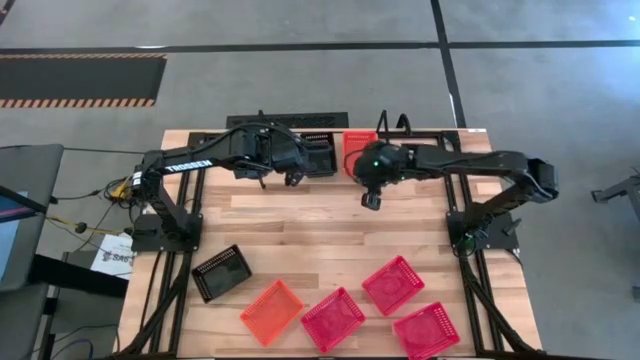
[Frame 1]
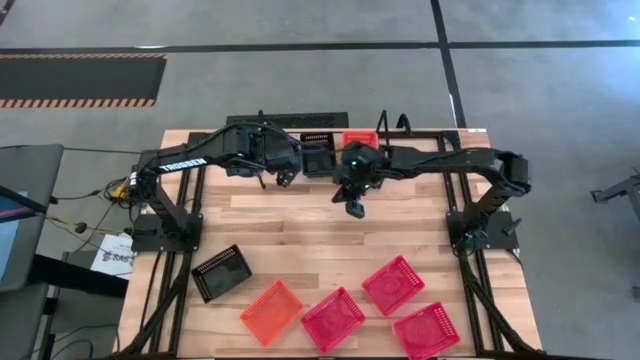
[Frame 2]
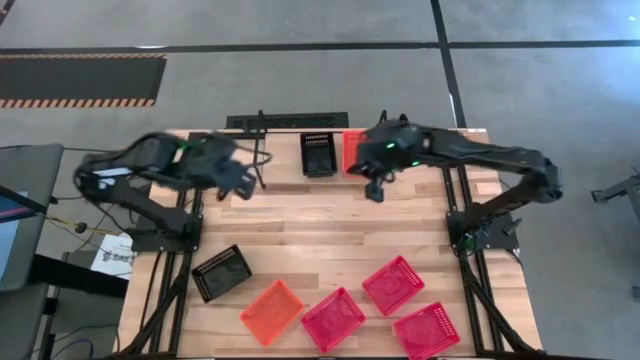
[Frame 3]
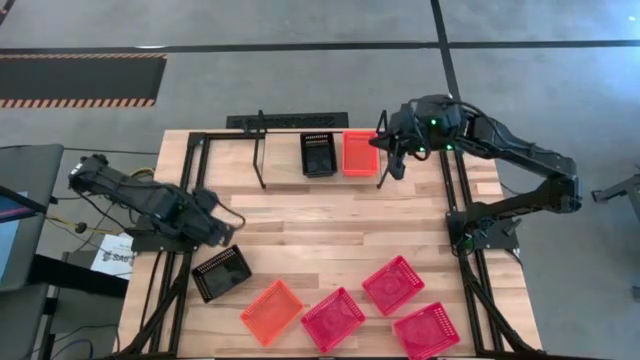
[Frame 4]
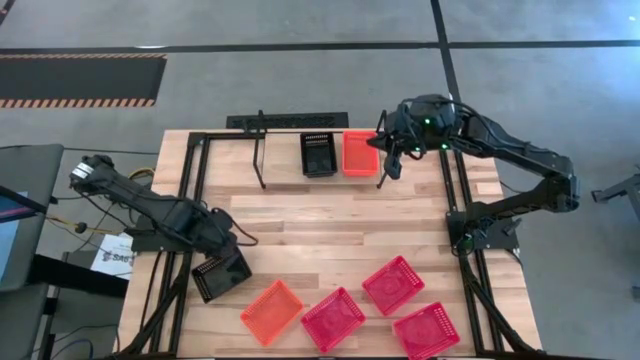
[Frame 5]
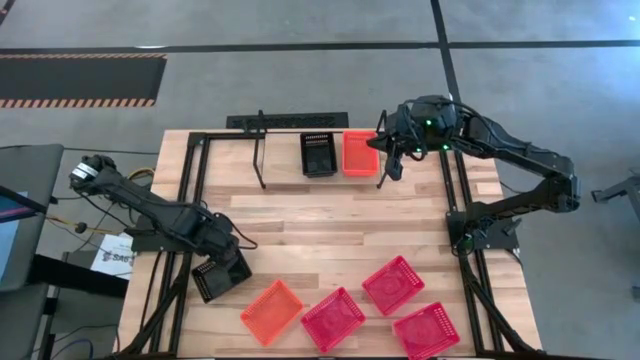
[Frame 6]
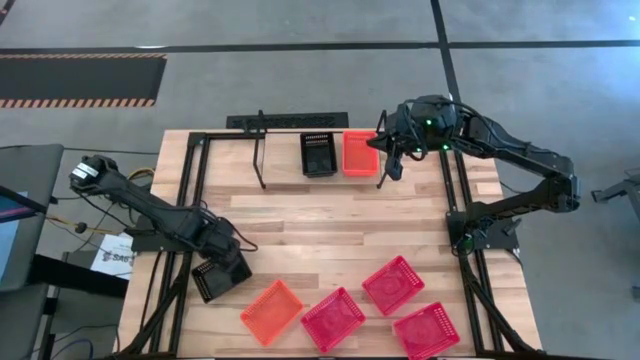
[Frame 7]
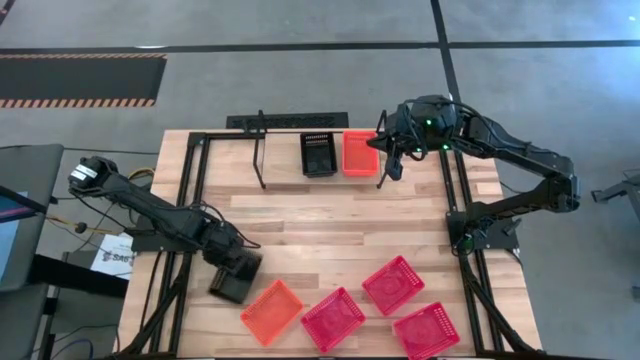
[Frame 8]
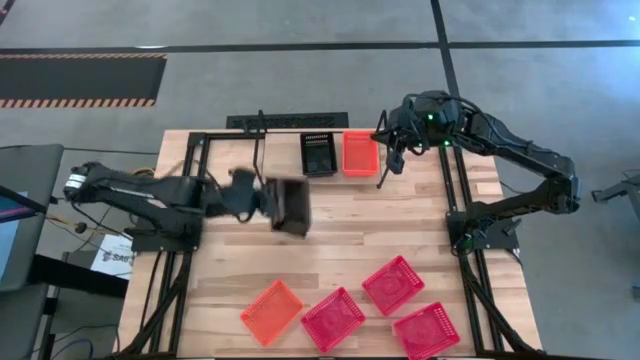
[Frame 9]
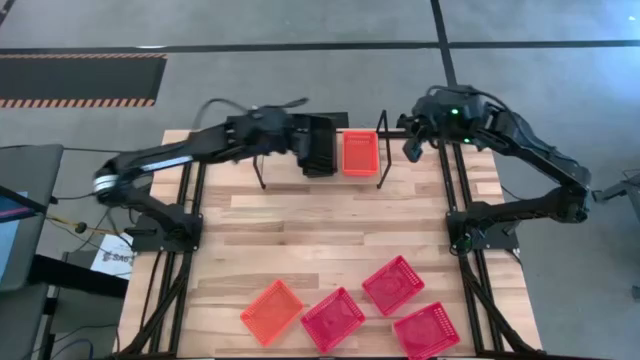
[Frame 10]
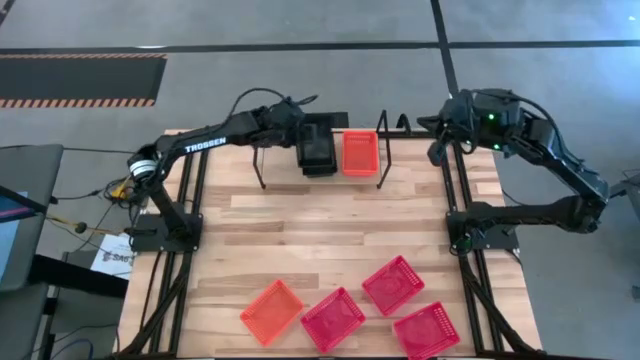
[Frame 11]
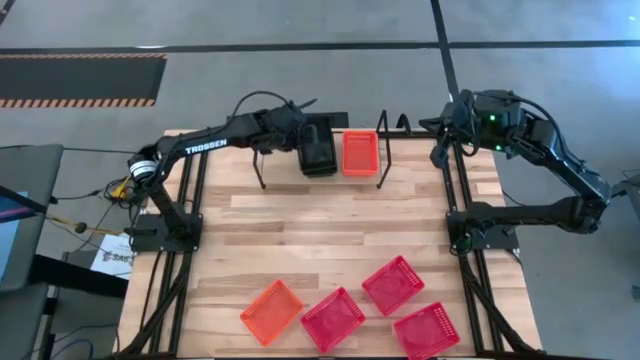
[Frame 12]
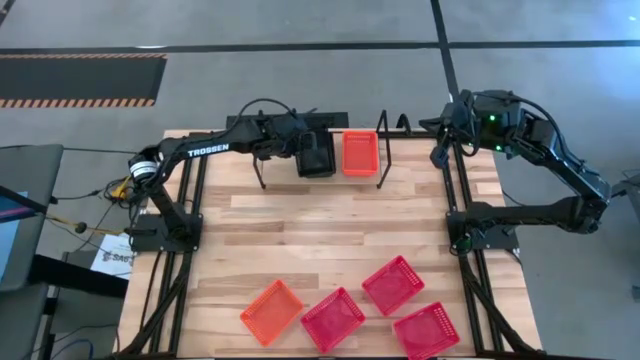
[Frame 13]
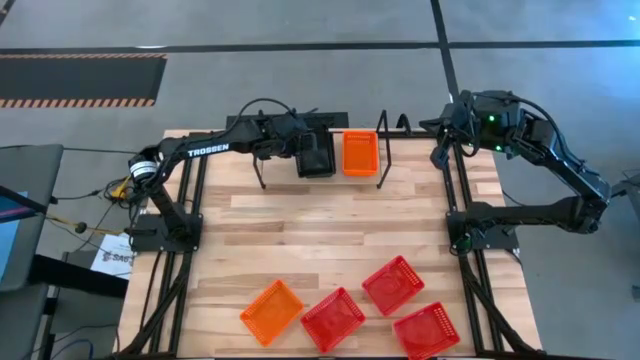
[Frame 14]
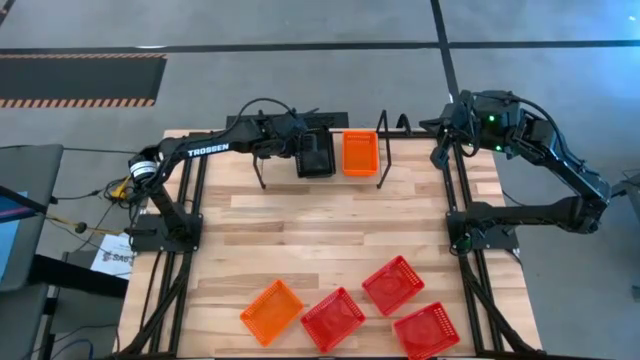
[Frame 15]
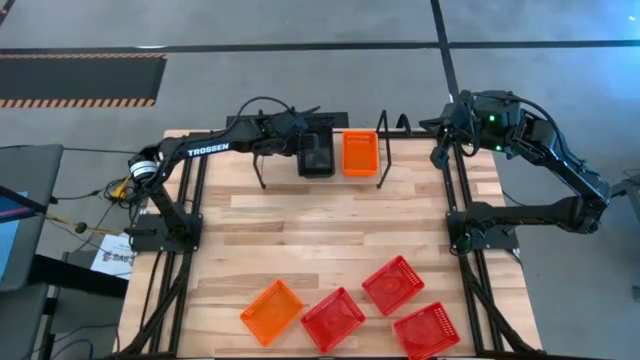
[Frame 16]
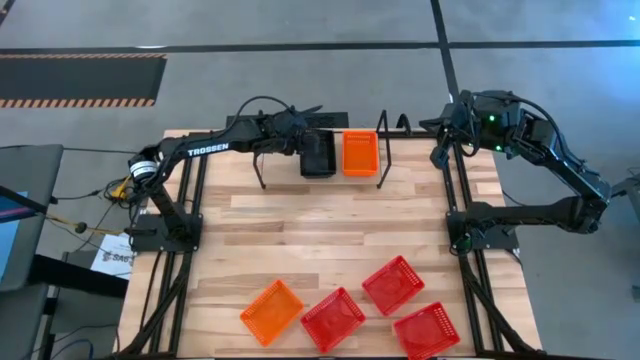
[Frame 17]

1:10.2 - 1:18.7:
Task: Stack baskets on shelf by color
Stack the black bin on top of the black bin on the shelf

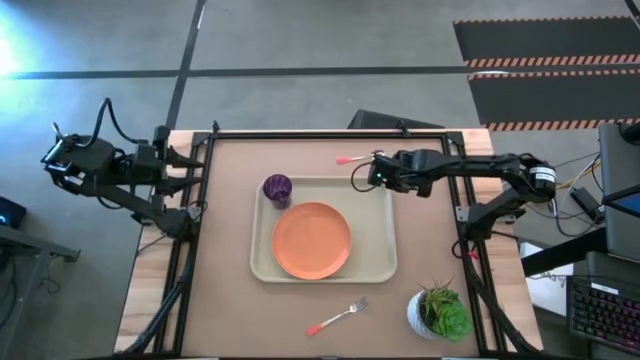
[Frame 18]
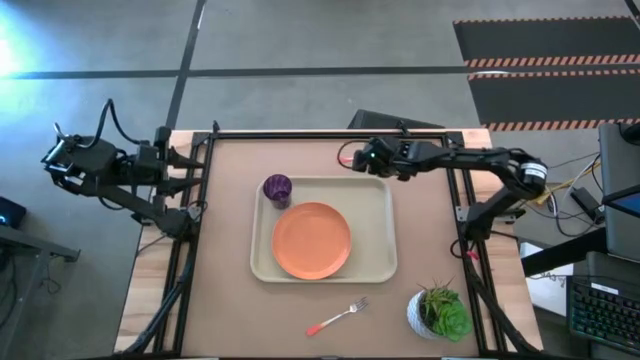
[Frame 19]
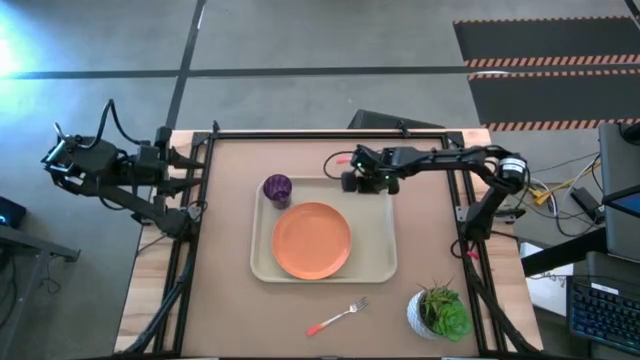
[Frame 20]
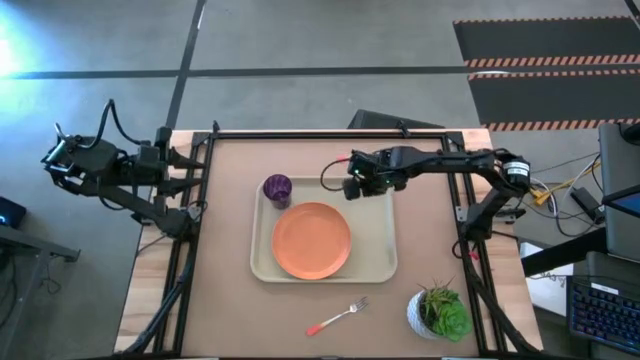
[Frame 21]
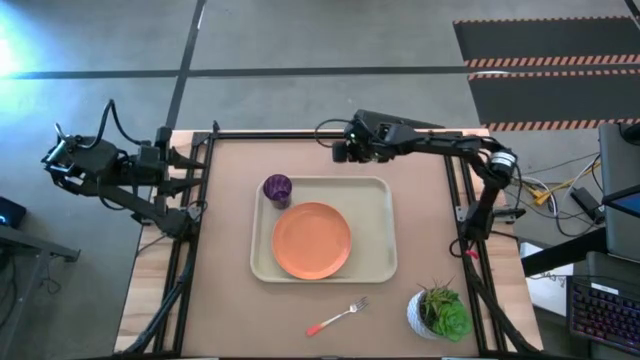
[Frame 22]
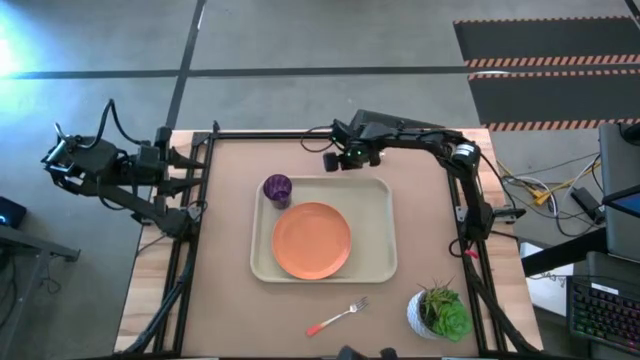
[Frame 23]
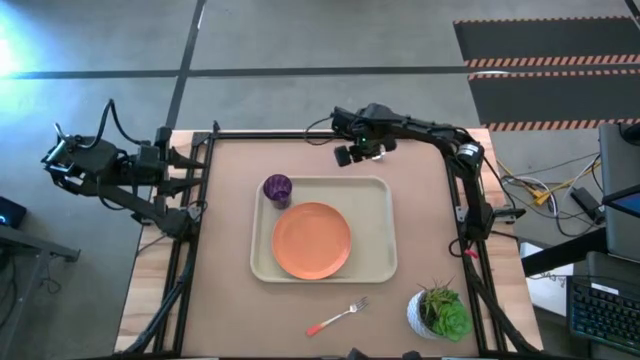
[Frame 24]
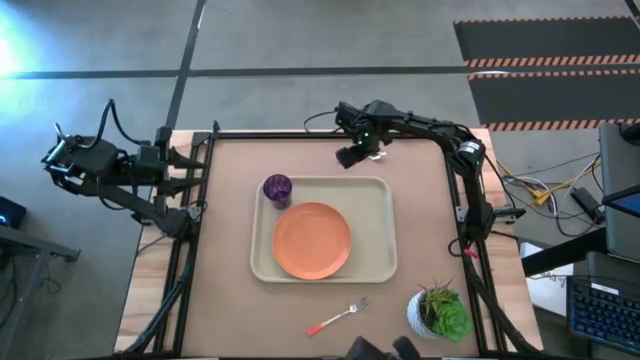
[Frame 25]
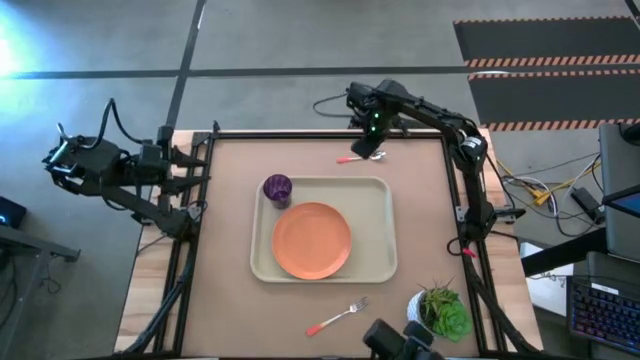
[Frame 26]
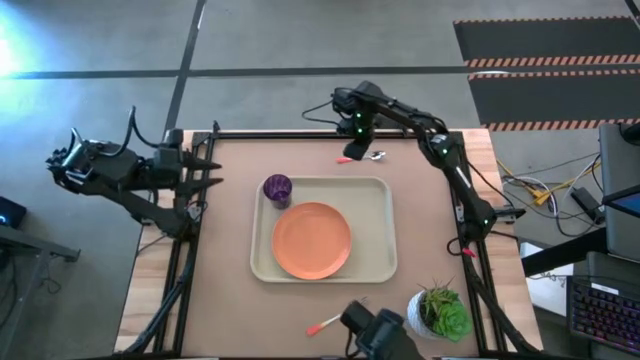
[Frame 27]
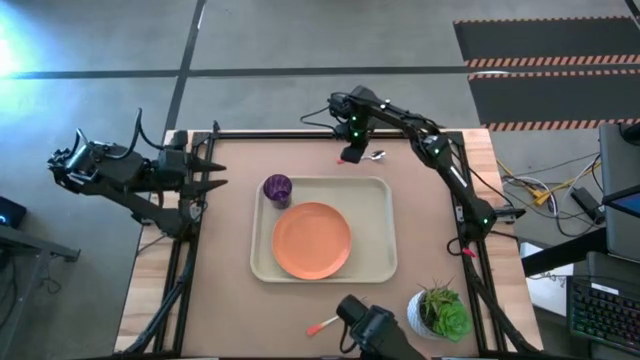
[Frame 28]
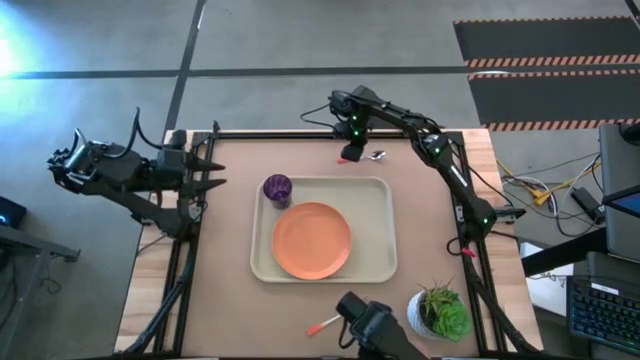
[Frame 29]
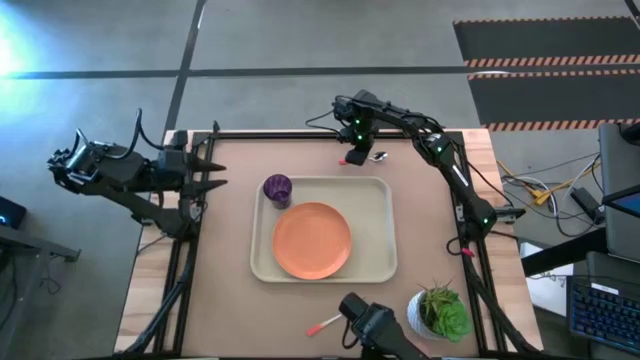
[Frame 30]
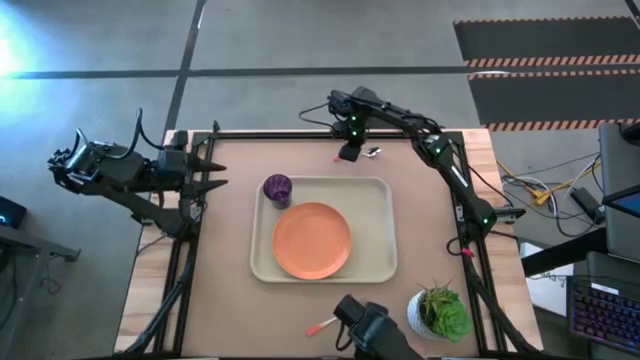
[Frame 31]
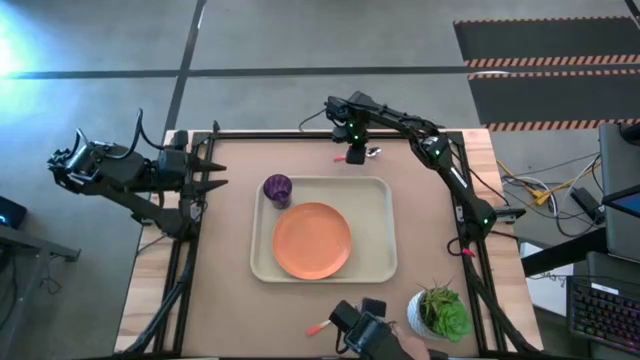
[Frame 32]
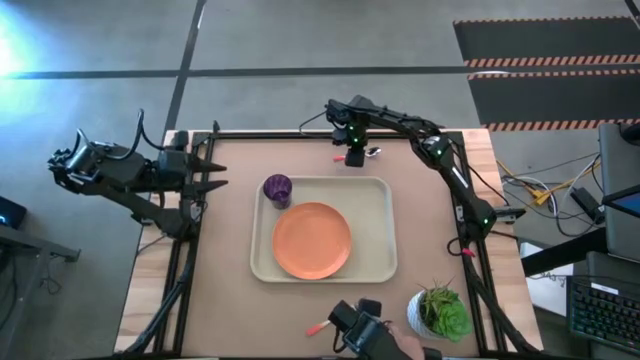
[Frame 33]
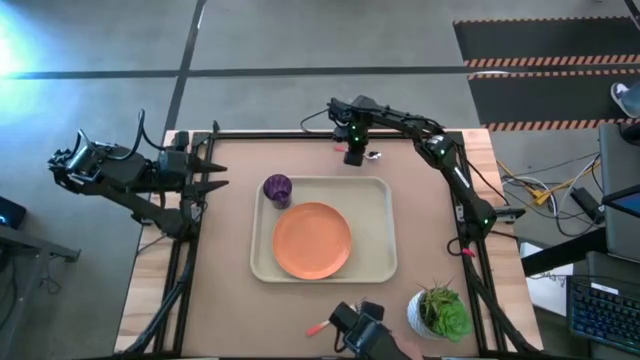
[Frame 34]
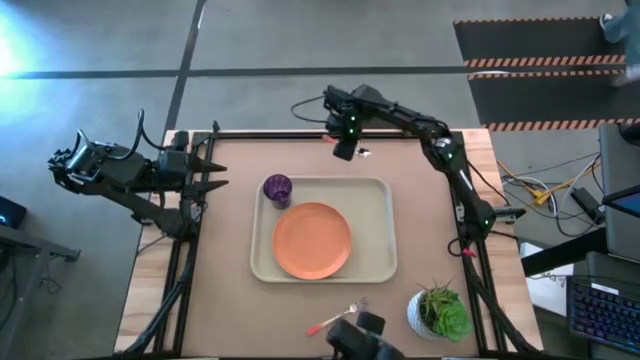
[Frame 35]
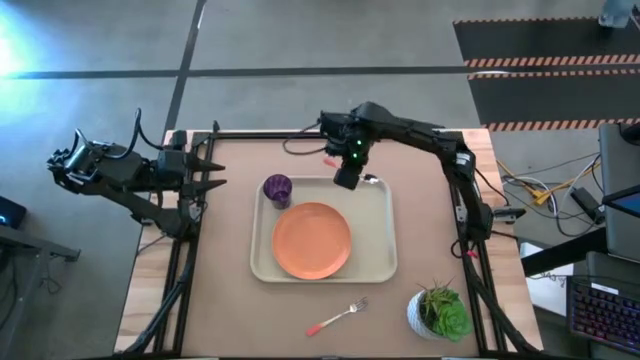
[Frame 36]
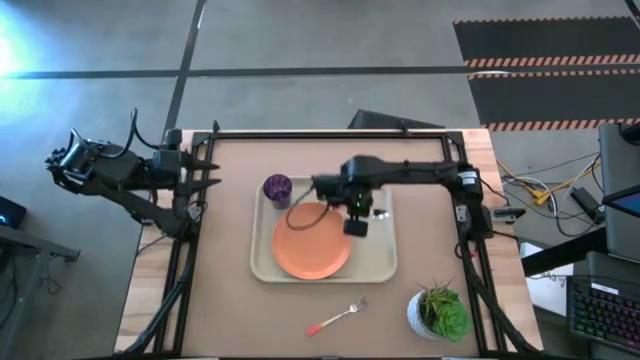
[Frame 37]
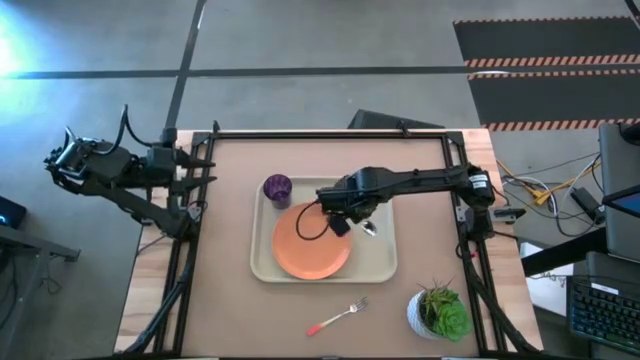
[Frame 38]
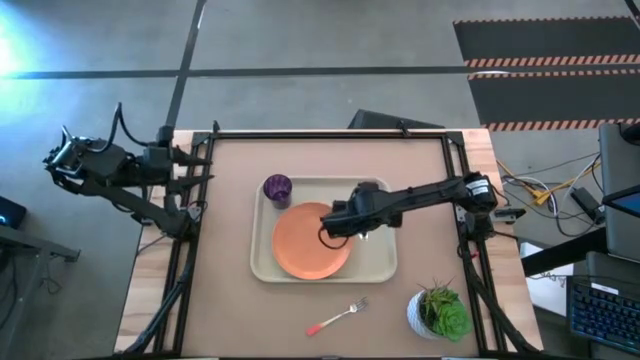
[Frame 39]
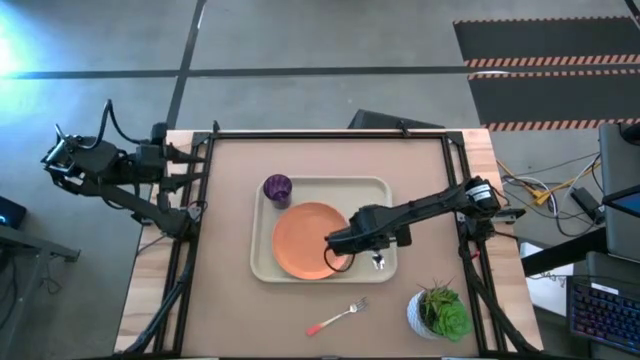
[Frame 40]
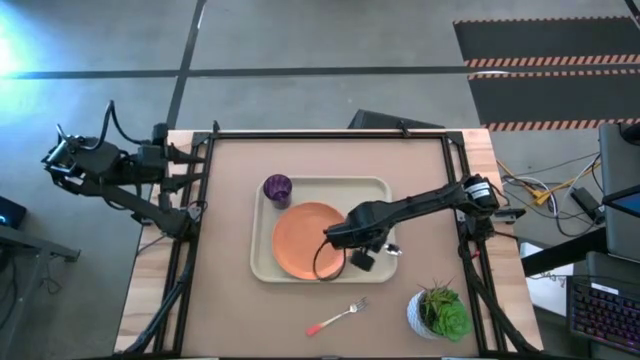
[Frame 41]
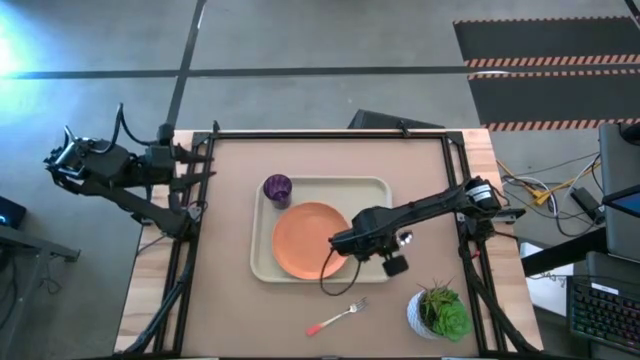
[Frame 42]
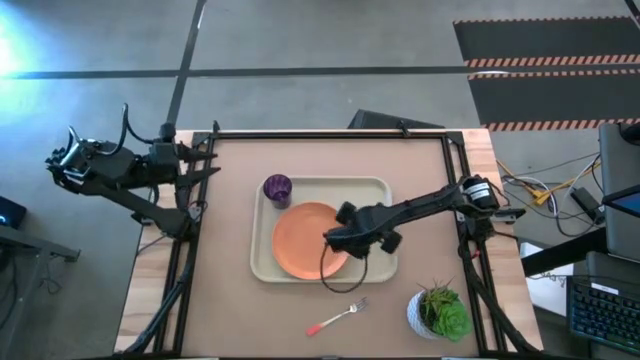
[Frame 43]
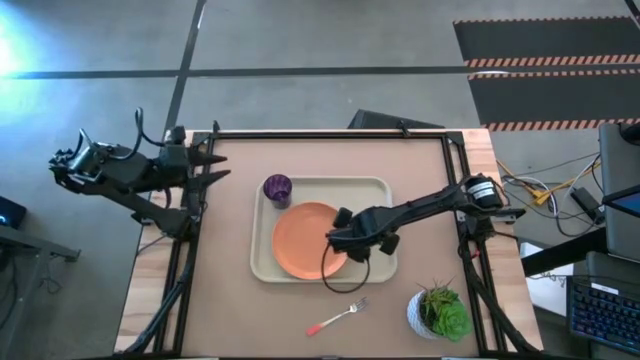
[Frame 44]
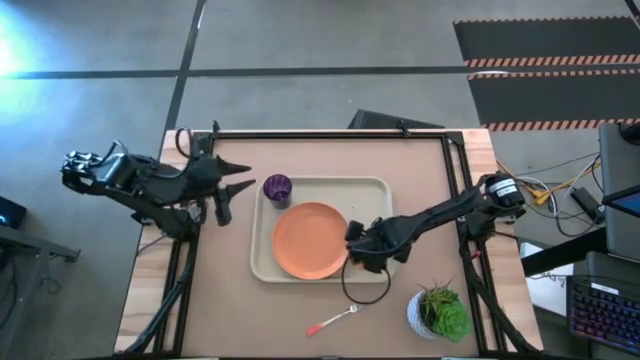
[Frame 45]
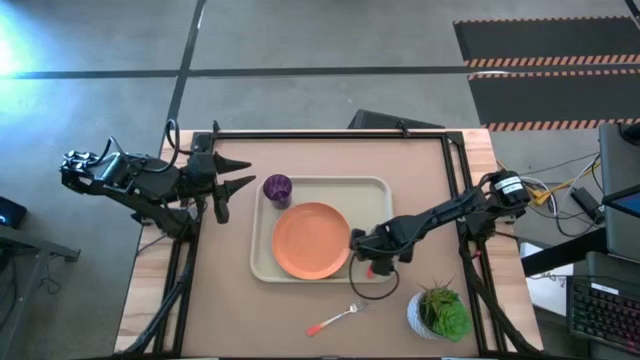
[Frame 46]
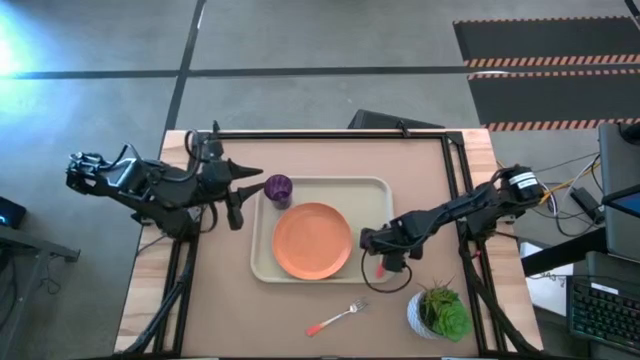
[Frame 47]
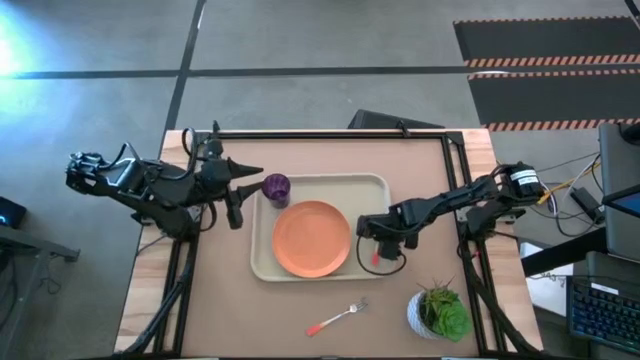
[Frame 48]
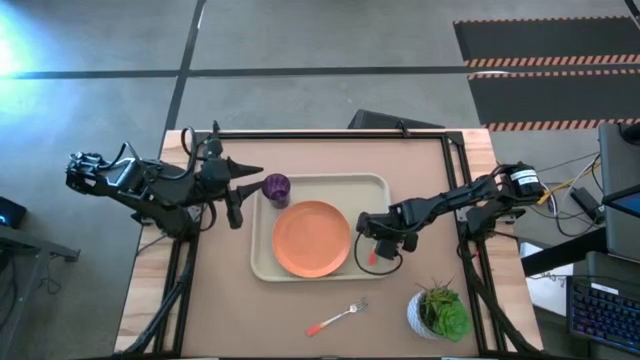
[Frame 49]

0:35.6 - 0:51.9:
Task: Pick and place plate/cup/fork/spoon on tray
Put the orange spoon on the beige tray
